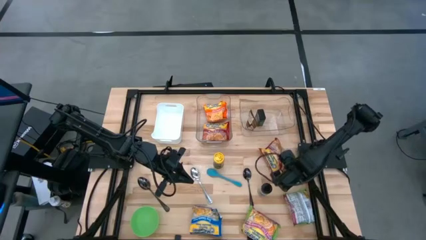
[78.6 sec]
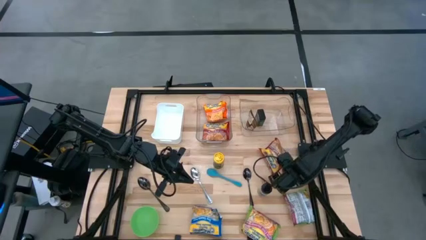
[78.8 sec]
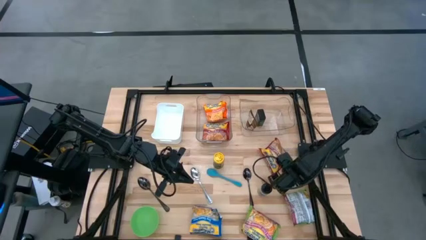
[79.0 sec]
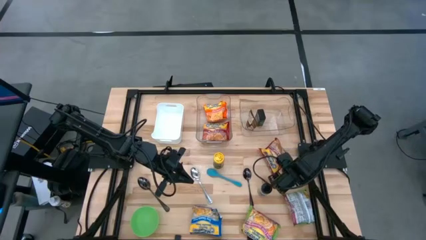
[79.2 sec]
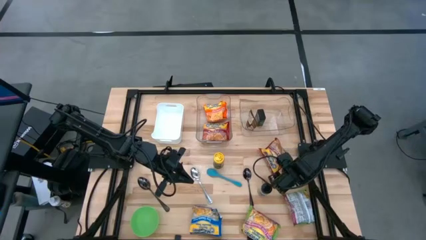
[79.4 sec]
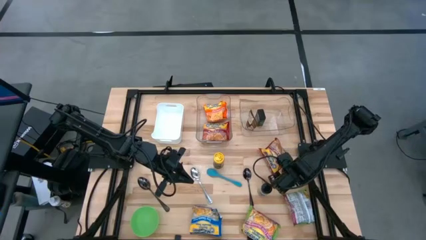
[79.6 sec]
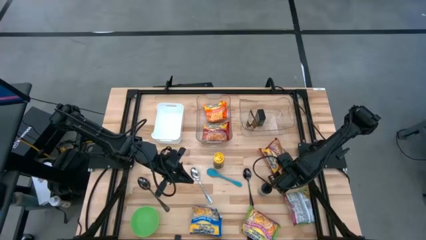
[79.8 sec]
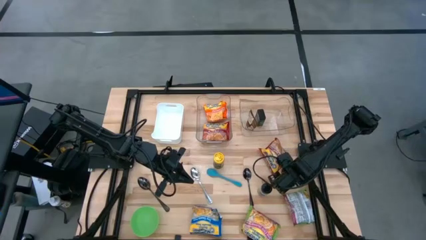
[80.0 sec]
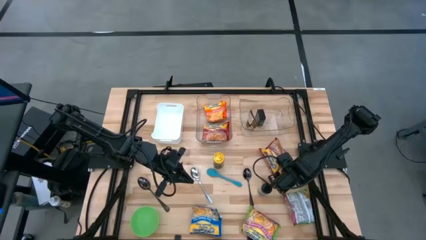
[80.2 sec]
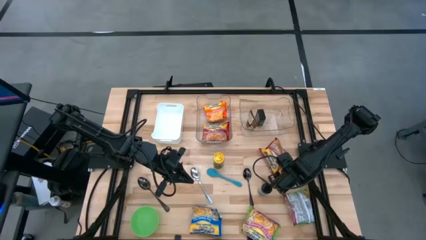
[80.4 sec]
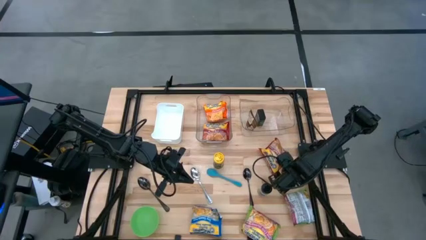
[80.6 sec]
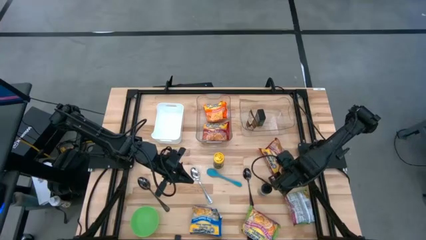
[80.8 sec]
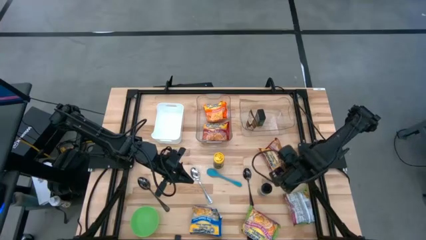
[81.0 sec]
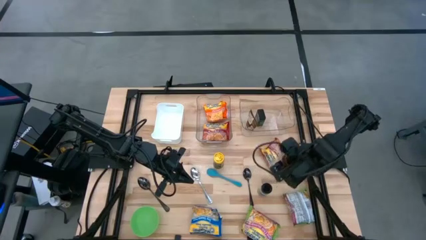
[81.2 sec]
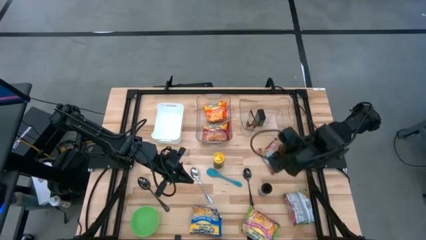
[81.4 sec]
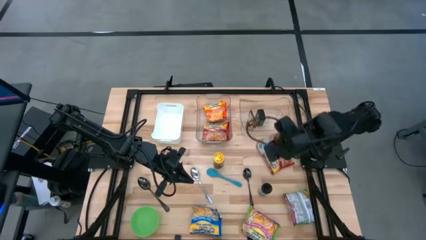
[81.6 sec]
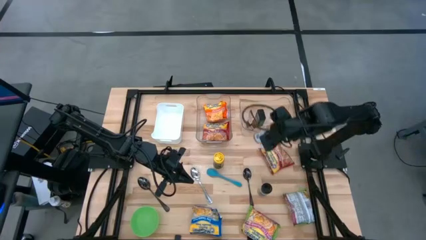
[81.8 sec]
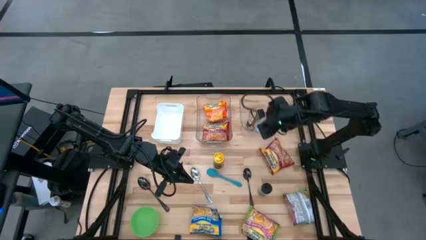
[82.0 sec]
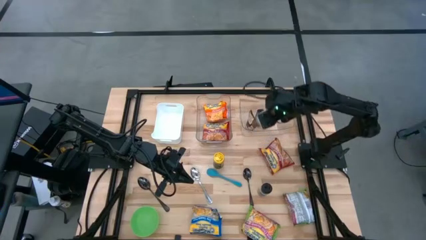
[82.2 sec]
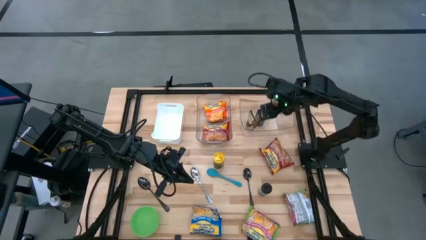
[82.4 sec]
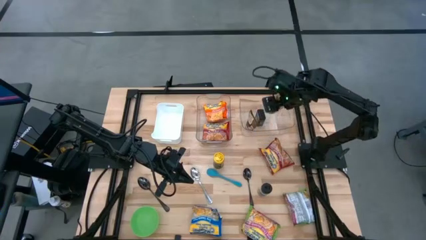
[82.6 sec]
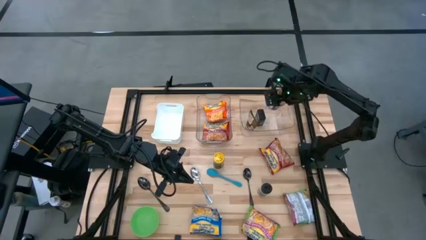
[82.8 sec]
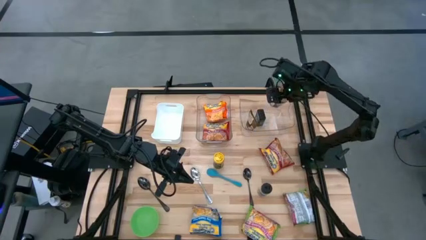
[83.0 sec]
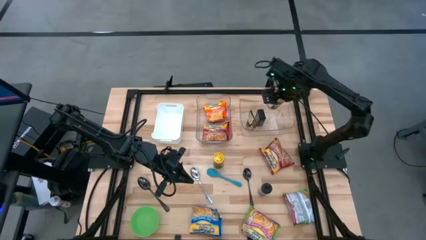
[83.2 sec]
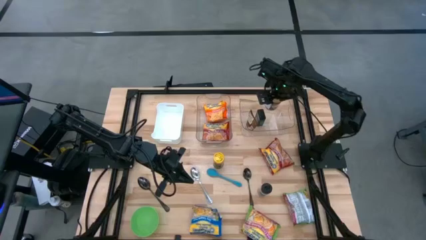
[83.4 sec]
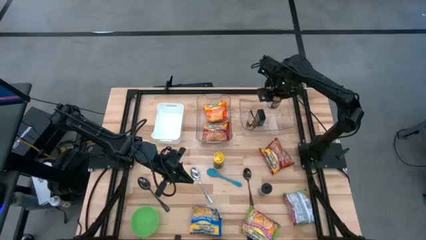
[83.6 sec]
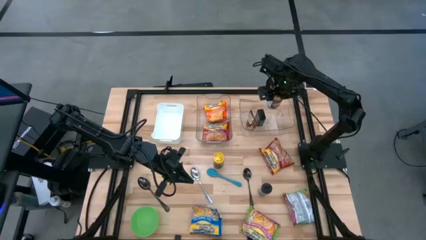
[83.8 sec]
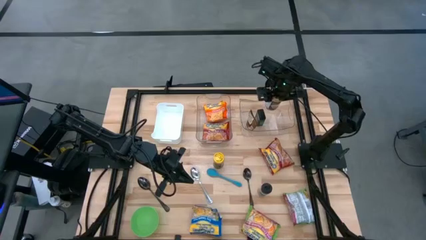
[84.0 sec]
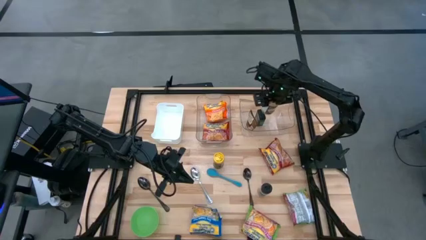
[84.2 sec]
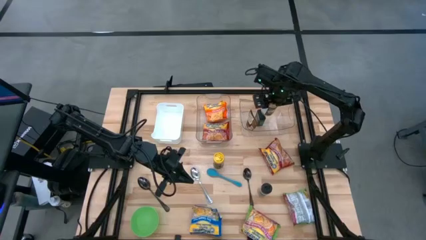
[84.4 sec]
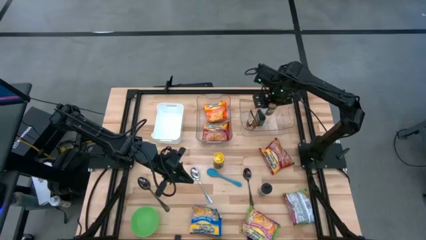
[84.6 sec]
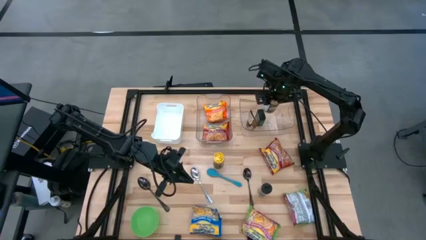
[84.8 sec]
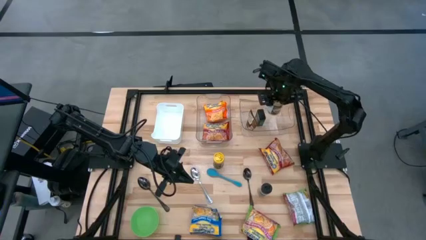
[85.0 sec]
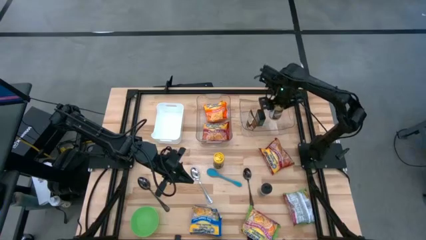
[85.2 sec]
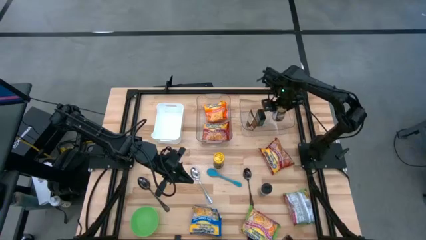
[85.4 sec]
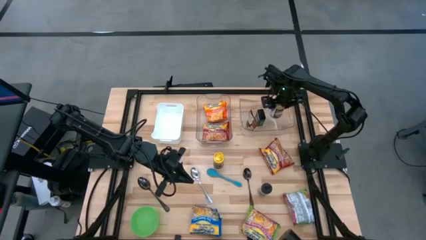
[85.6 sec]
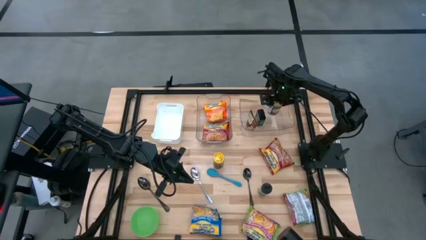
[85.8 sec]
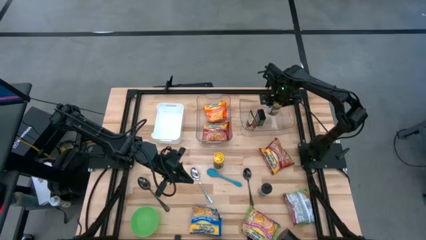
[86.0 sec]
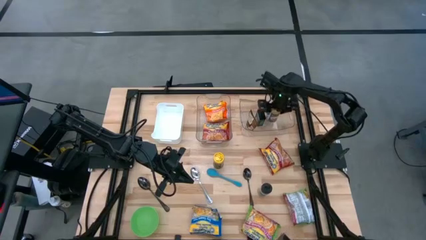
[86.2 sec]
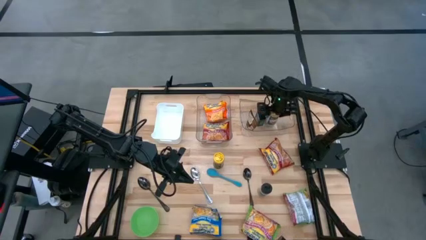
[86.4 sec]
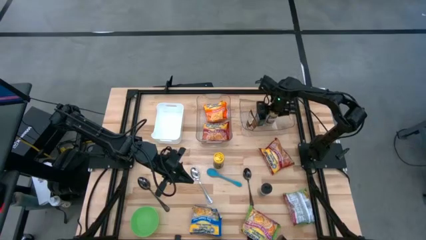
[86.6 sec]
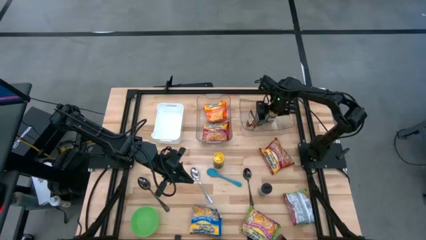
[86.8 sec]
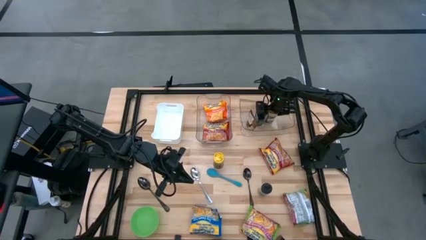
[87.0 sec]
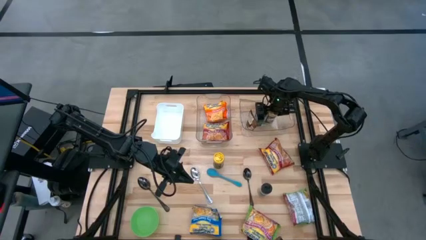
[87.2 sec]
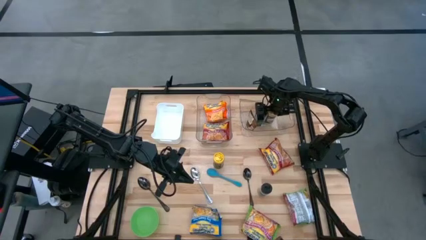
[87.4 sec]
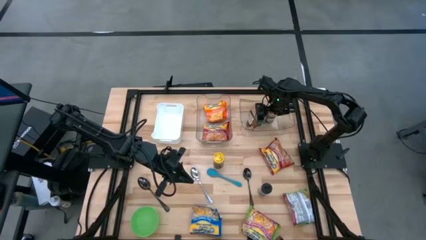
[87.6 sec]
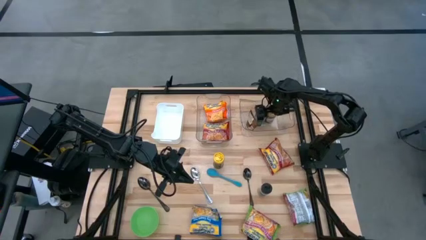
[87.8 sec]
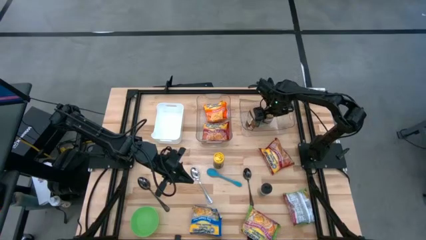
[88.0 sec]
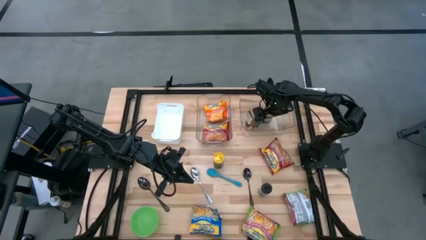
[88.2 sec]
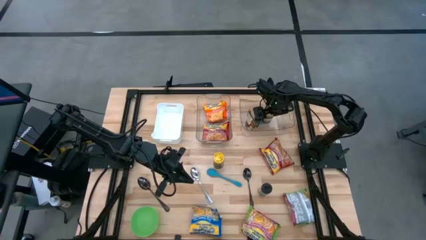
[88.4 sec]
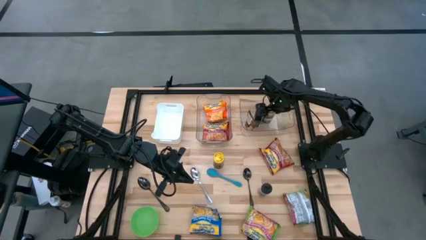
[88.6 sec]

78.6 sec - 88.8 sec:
Task: Pick & Place Food Item
Put the gold spice bottle into the right transparent bin

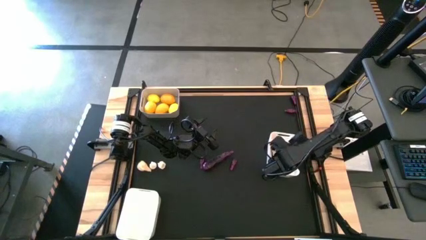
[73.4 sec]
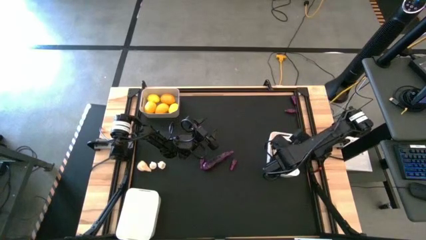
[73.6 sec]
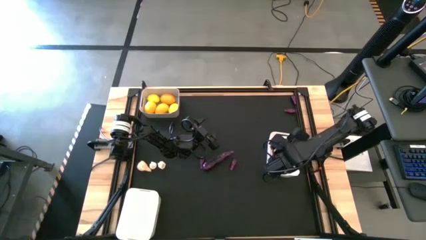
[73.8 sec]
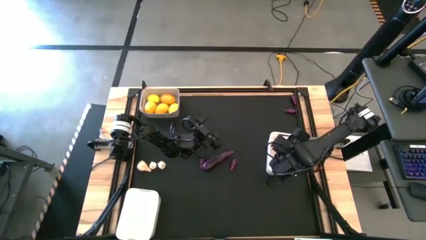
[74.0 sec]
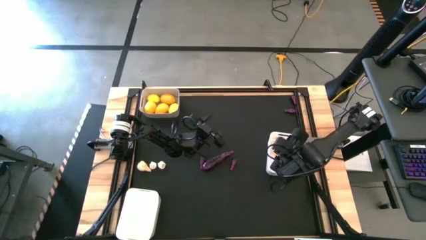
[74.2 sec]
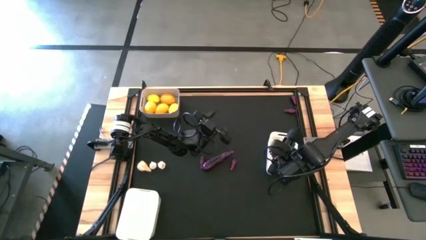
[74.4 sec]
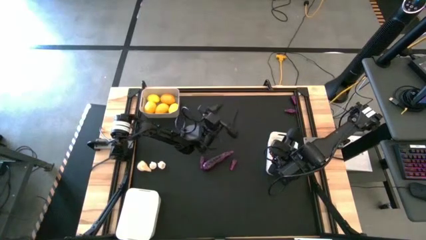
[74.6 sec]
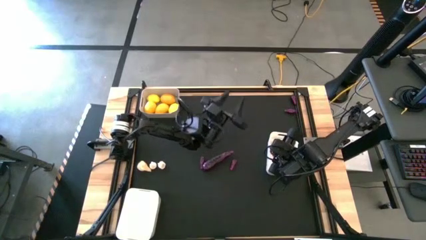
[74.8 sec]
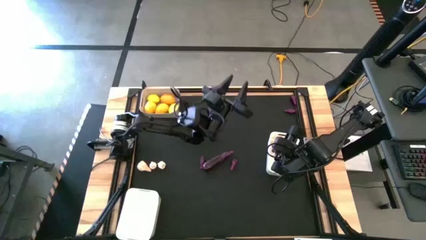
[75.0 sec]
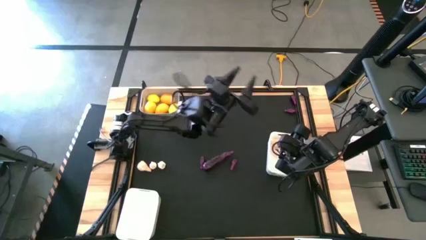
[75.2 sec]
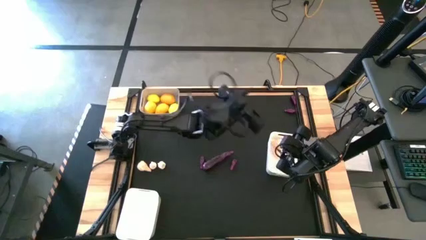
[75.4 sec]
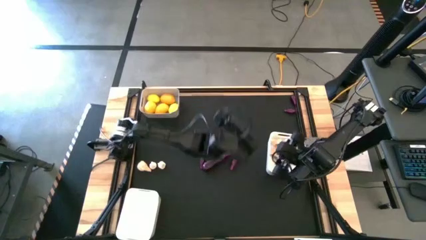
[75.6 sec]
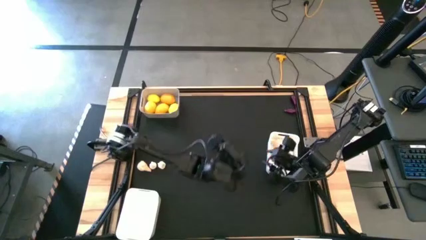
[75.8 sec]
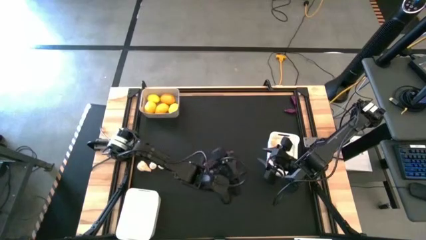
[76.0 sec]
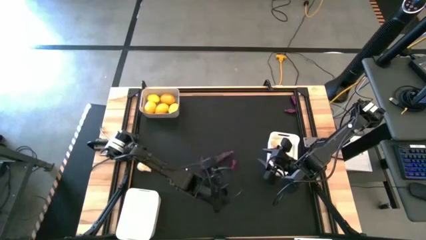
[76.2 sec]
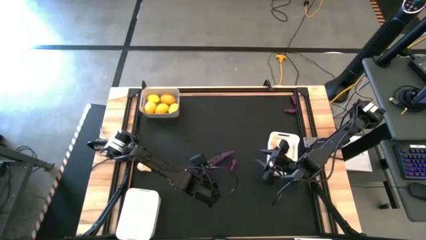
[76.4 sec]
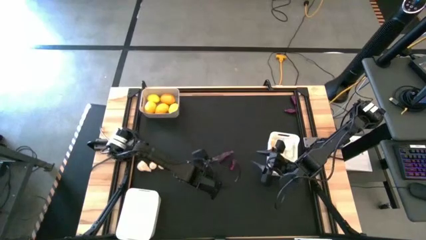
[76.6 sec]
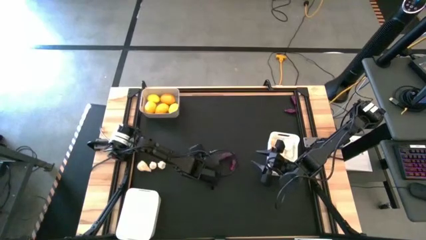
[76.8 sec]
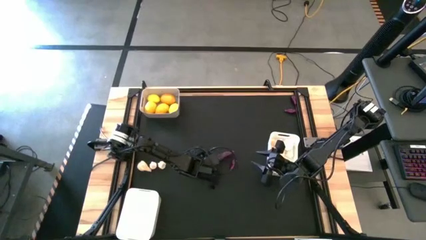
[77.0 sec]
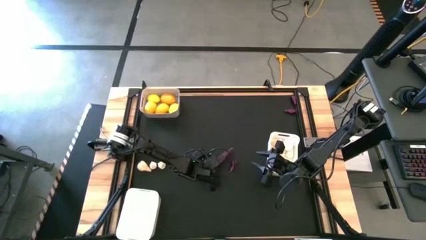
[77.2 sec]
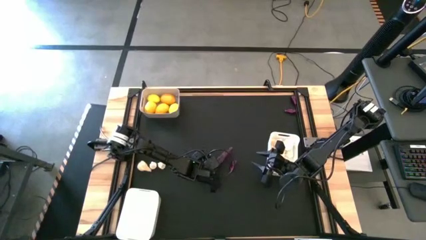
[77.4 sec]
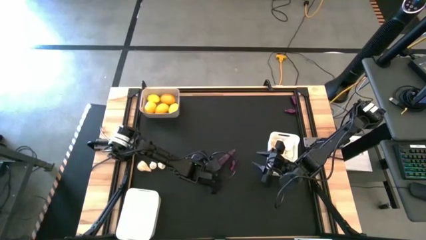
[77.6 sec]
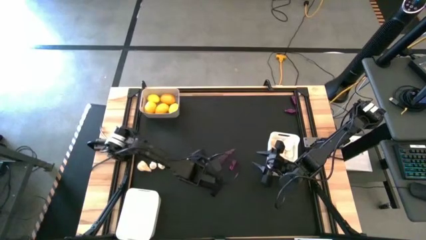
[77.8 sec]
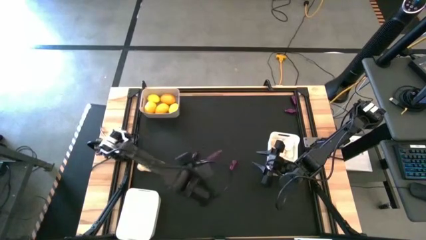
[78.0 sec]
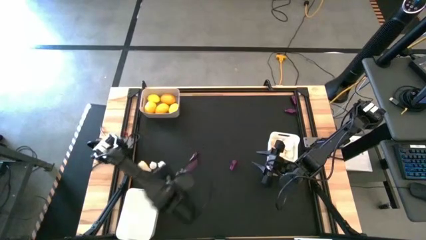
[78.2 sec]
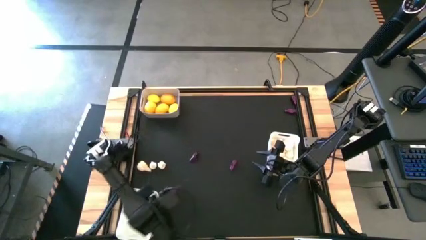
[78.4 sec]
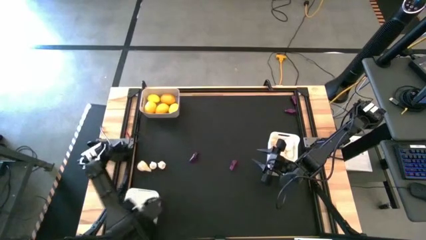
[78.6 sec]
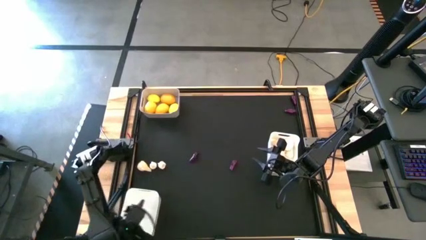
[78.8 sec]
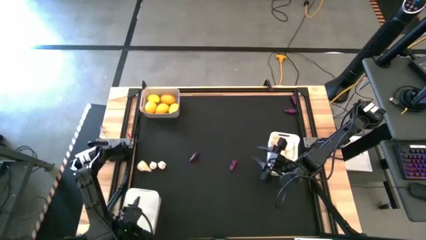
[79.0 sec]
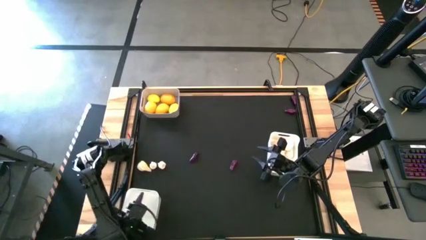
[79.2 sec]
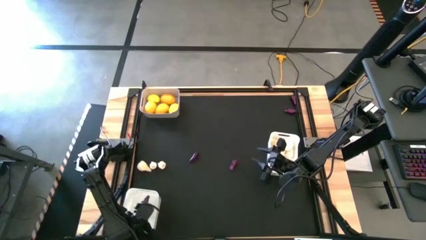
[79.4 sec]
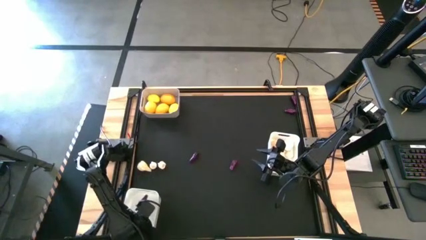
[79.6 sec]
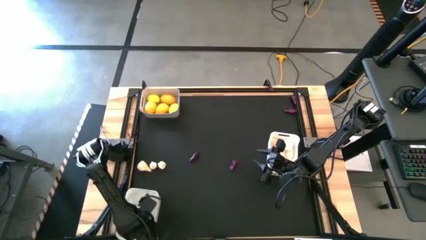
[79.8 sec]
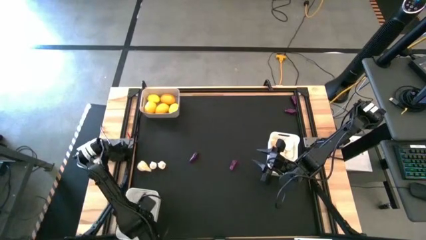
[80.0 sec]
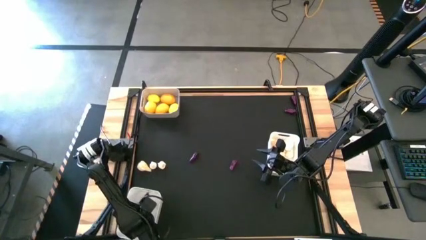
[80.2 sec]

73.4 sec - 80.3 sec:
Task: Sort produce into baskets
Put the center eggplant into the bottom left white bin
